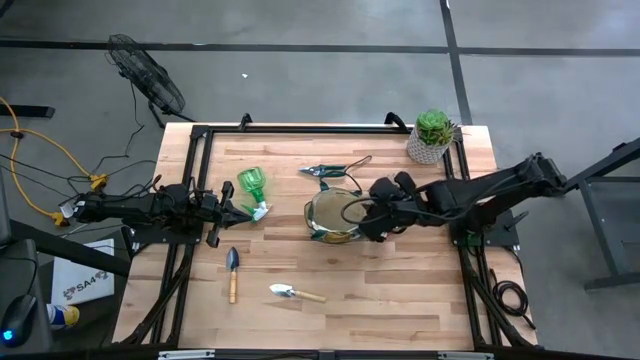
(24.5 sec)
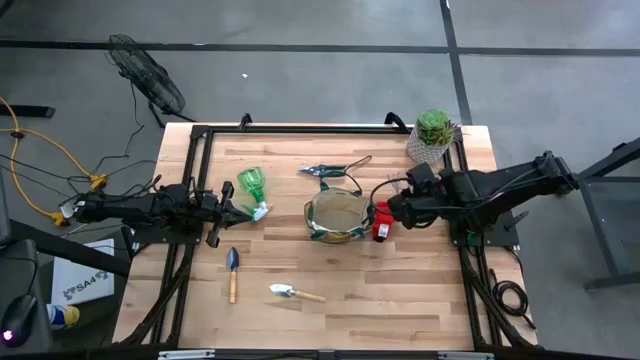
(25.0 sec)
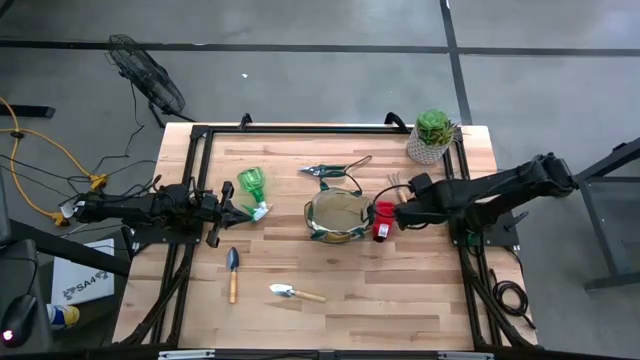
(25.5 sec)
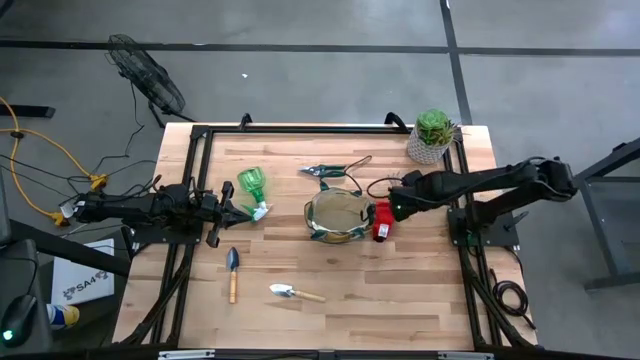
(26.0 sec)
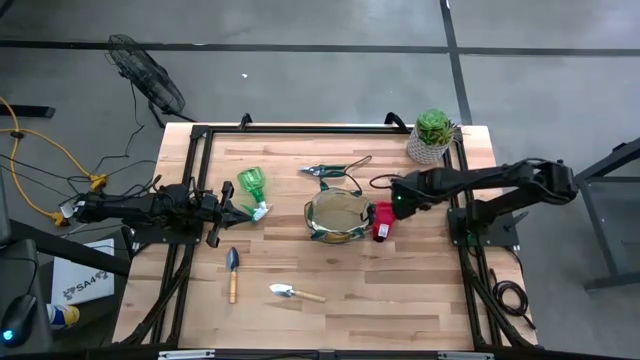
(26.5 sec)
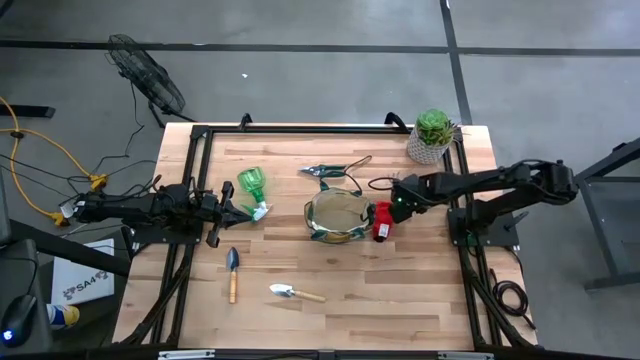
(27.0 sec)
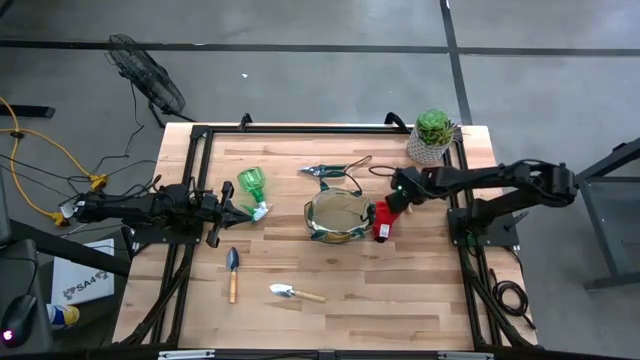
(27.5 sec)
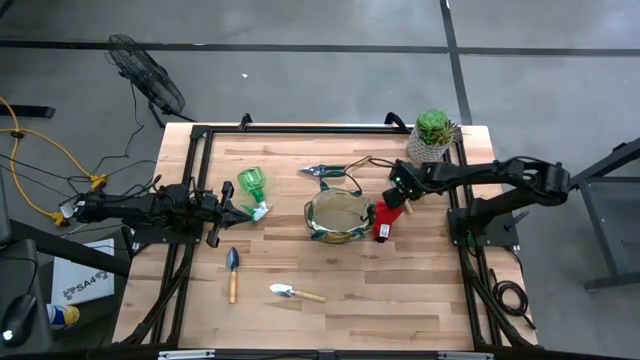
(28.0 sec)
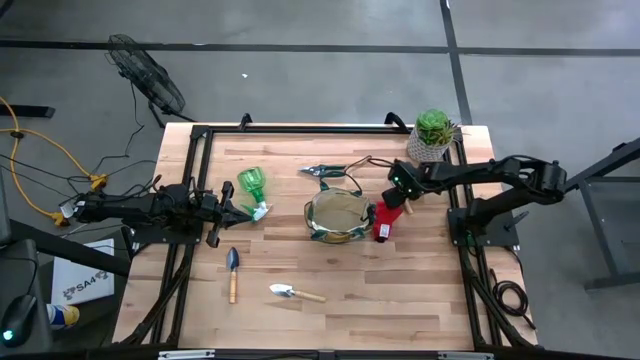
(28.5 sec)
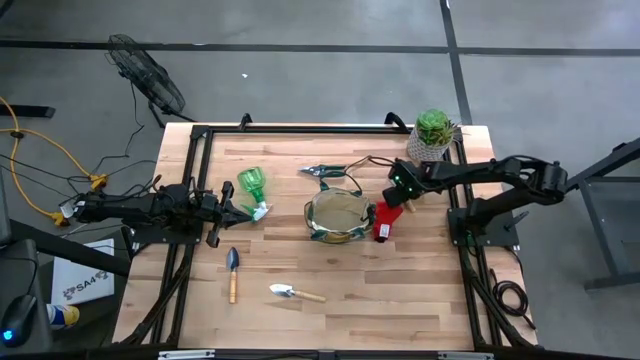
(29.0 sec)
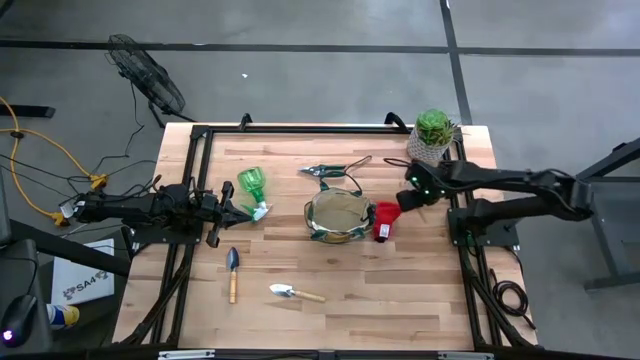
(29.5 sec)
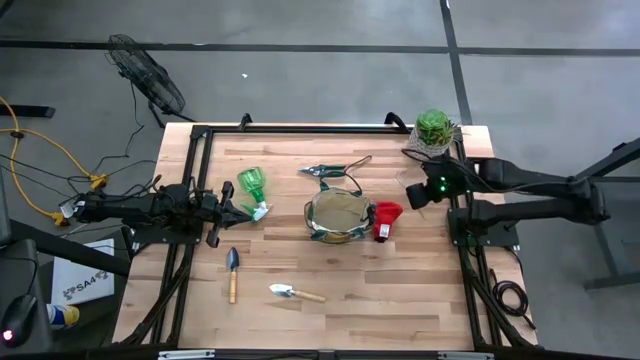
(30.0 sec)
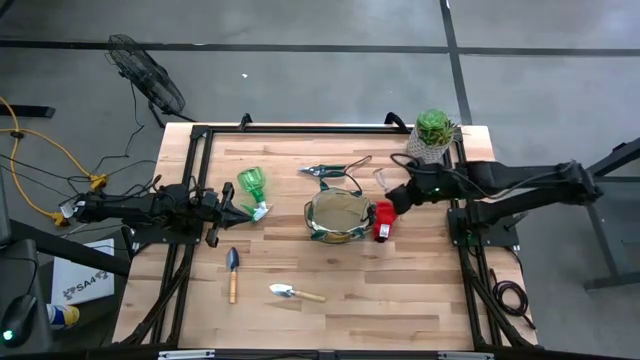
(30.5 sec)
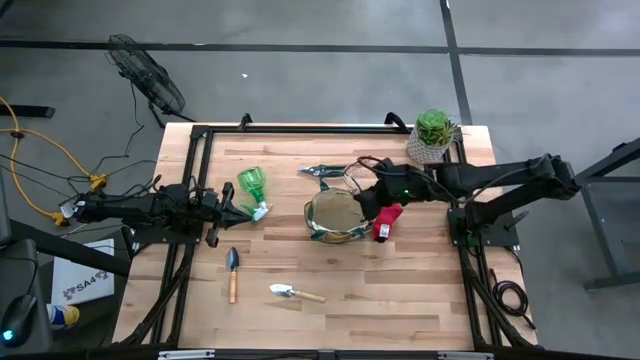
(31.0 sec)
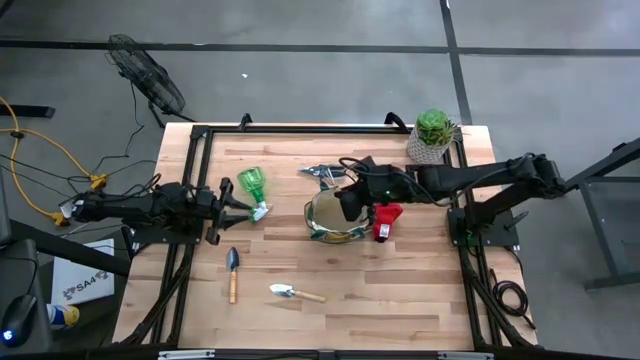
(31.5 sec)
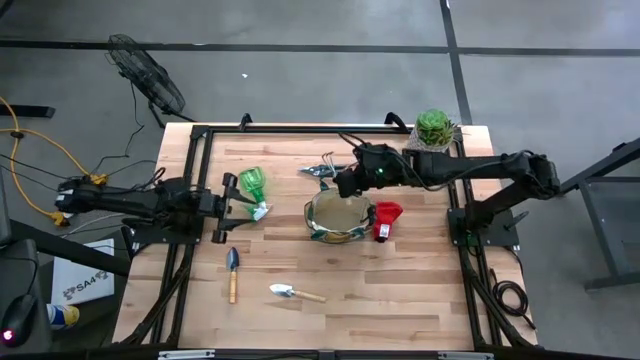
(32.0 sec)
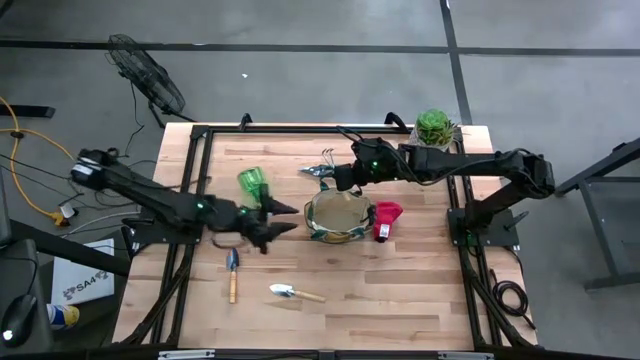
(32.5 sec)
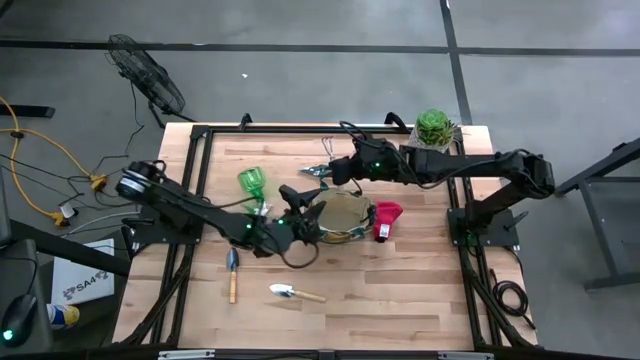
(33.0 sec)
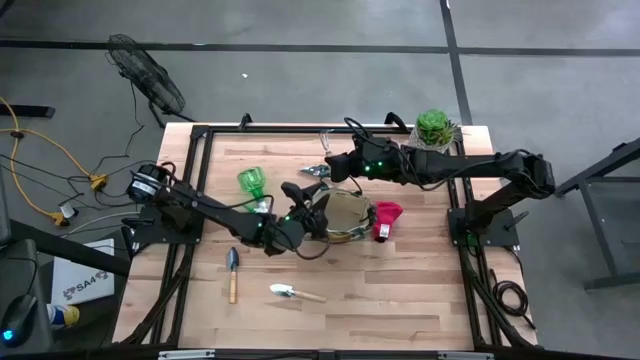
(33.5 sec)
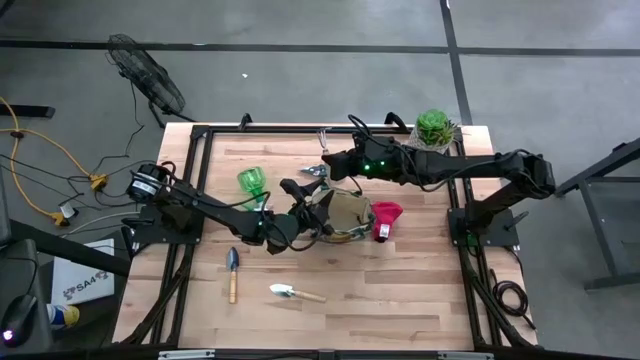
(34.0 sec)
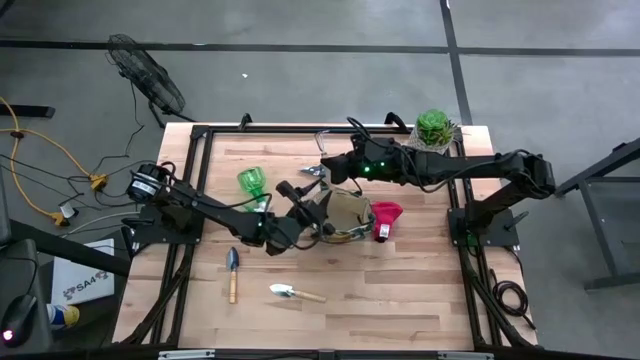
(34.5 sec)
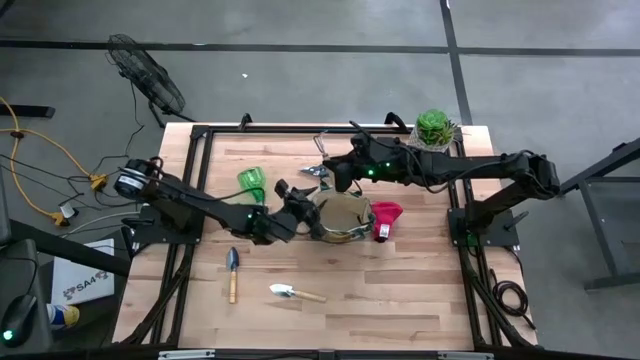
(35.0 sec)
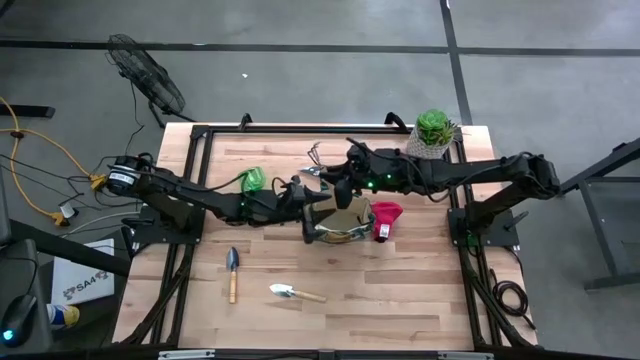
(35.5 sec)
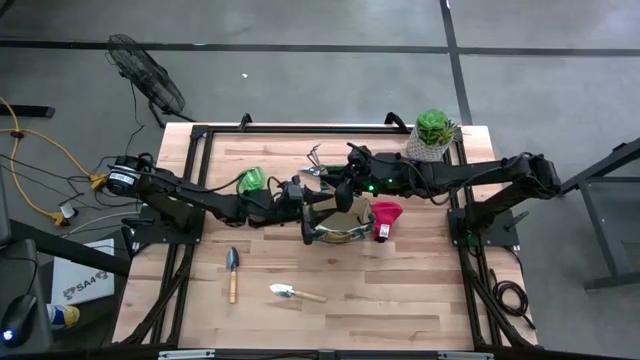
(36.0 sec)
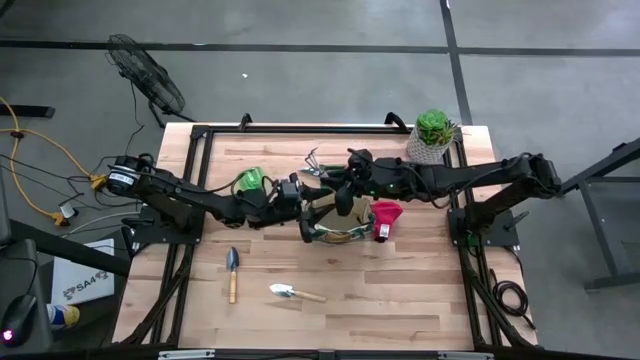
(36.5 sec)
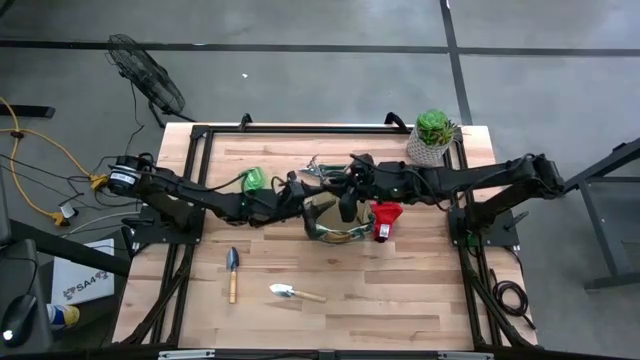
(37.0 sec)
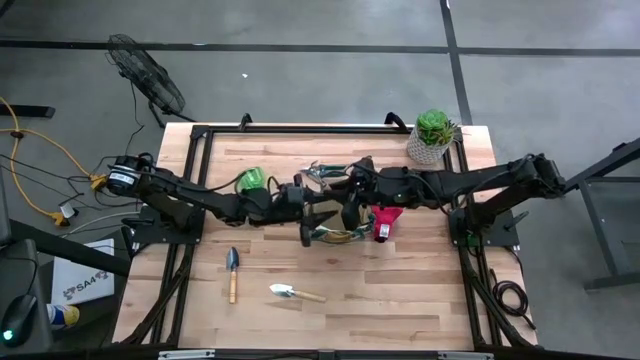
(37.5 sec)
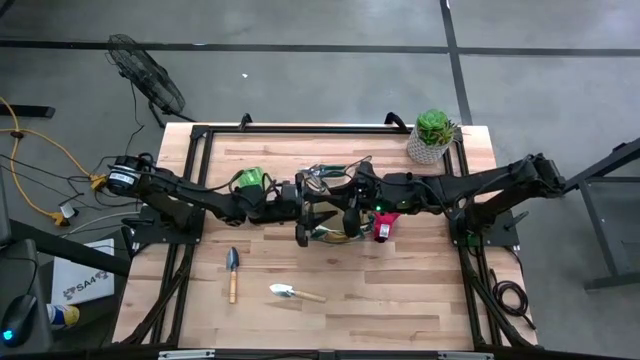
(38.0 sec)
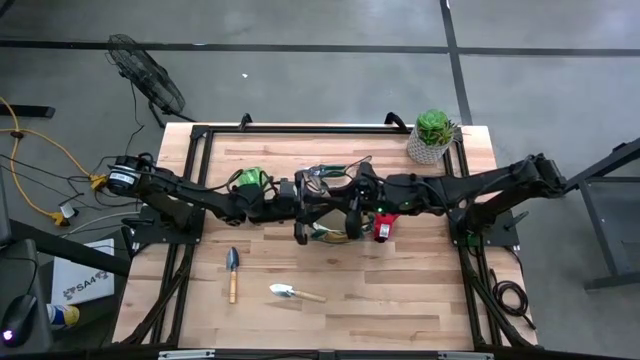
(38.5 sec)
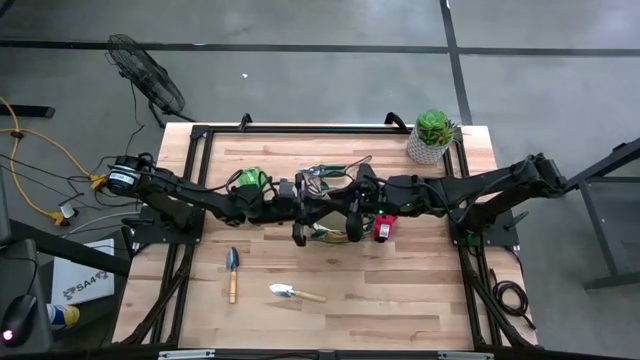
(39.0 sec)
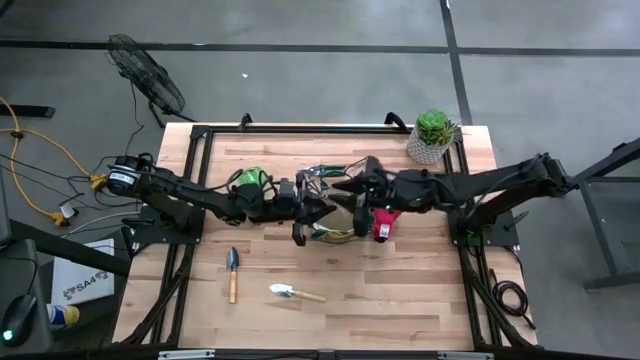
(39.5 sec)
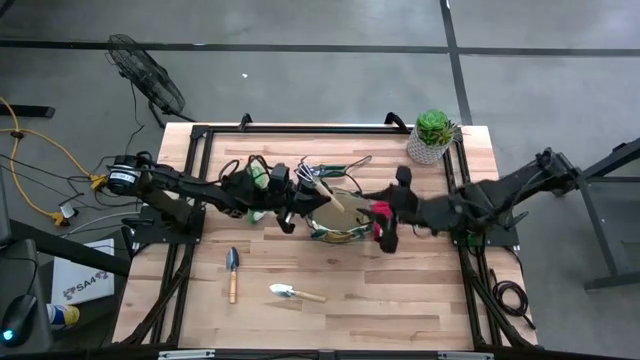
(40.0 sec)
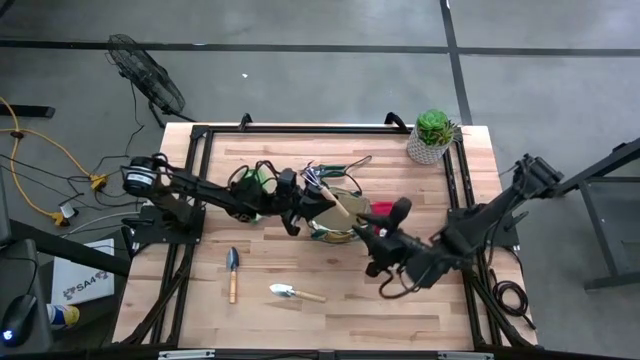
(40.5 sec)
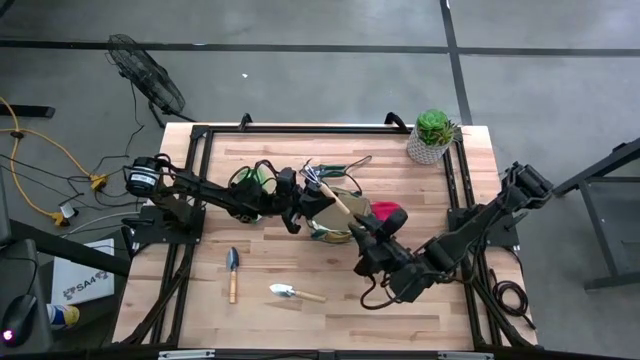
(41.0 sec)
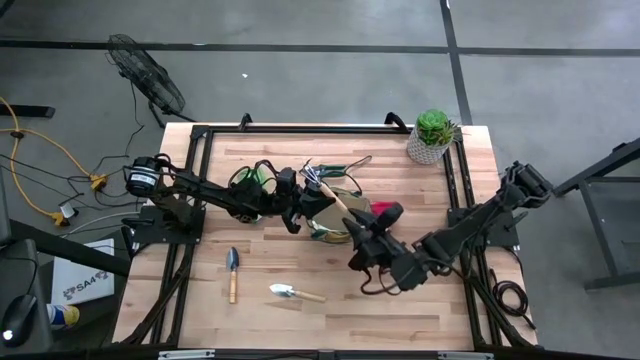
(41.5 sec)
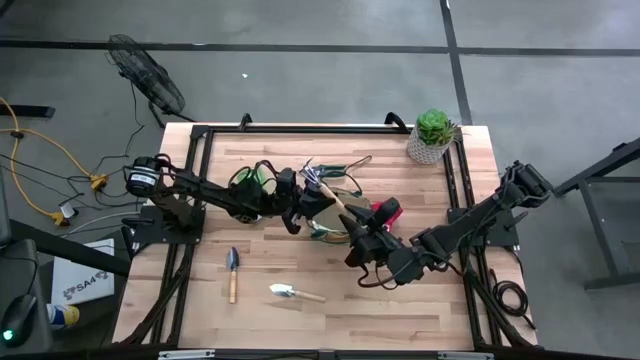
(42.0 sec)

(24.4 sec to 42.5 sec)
Task: Pick & Place Garden tools in Gardening bag
Put the brown hand rake into the gardening bag
